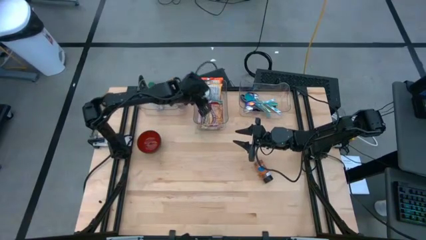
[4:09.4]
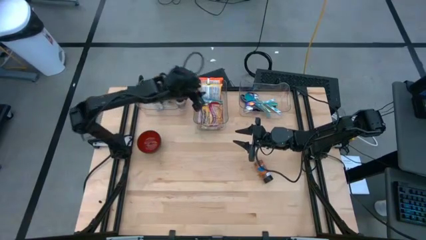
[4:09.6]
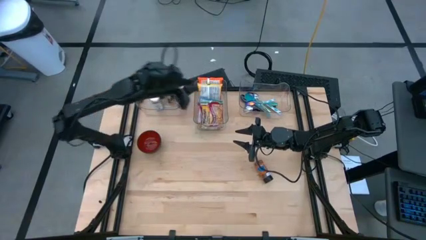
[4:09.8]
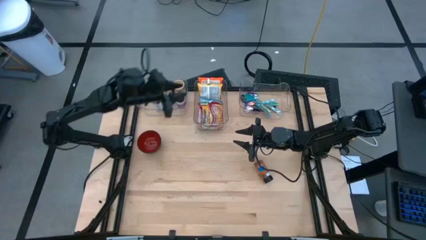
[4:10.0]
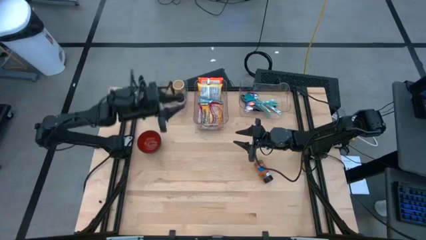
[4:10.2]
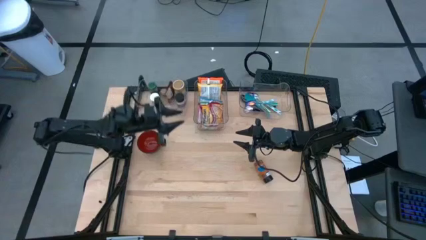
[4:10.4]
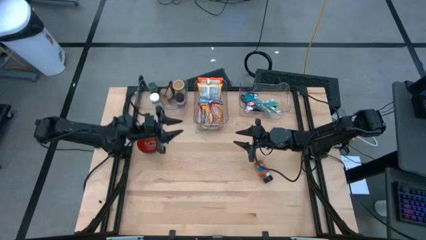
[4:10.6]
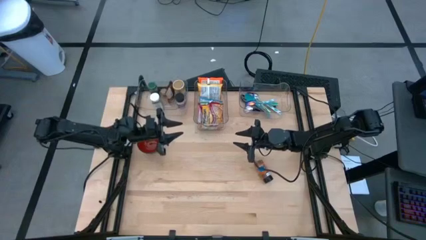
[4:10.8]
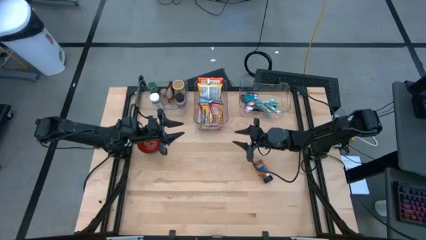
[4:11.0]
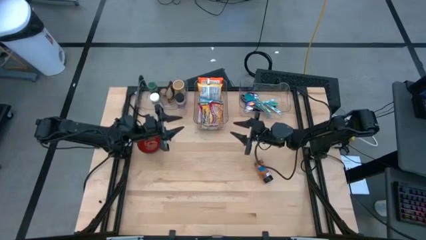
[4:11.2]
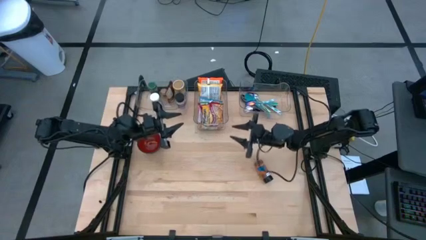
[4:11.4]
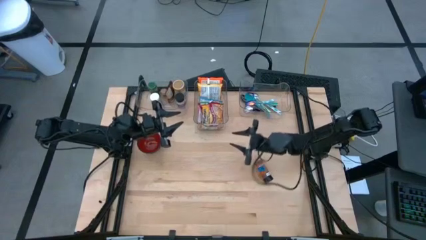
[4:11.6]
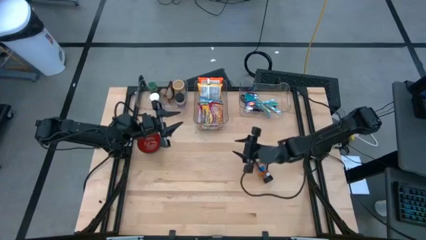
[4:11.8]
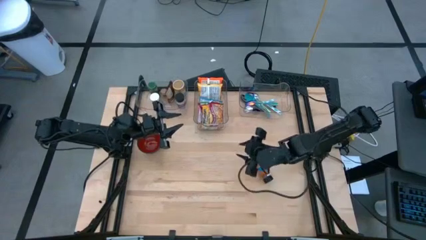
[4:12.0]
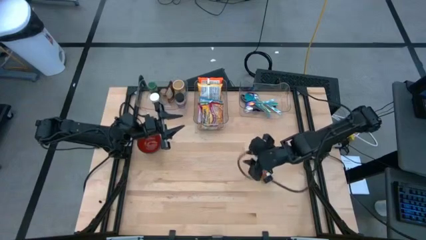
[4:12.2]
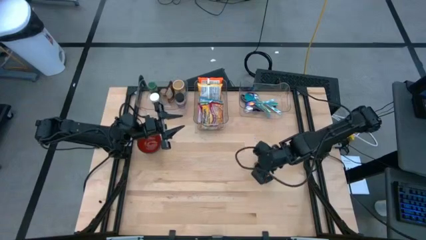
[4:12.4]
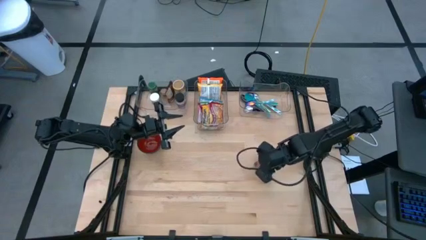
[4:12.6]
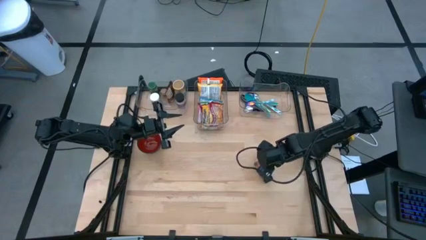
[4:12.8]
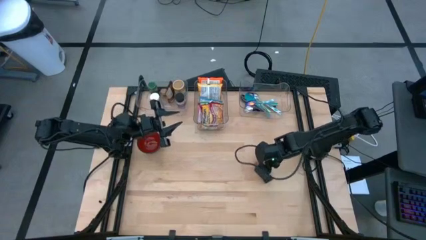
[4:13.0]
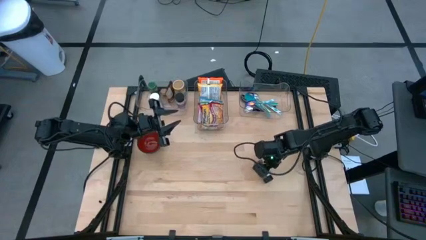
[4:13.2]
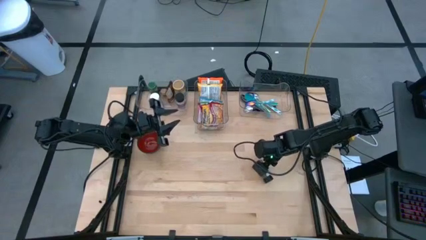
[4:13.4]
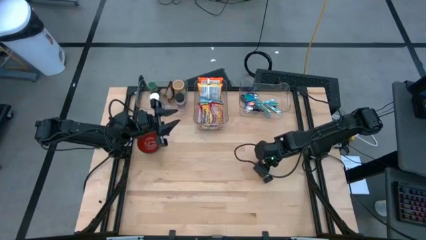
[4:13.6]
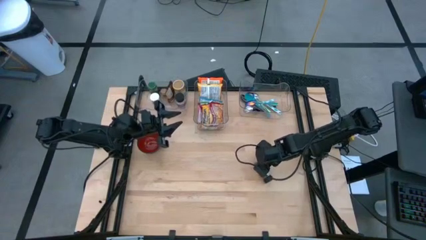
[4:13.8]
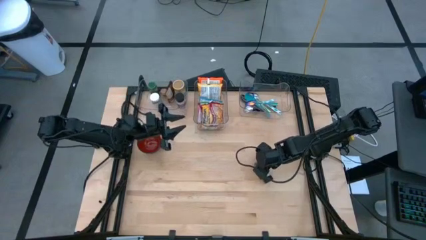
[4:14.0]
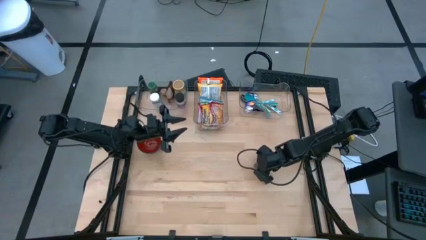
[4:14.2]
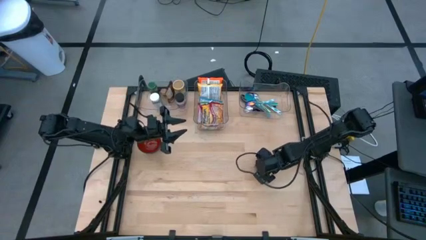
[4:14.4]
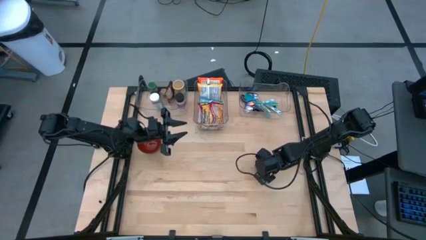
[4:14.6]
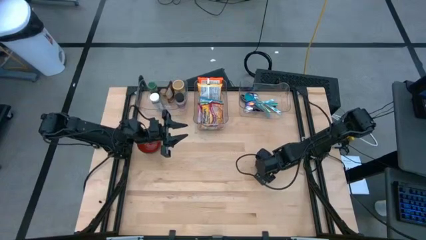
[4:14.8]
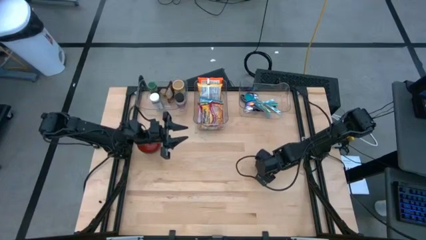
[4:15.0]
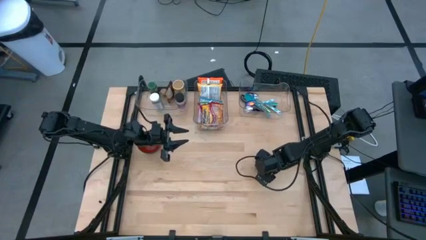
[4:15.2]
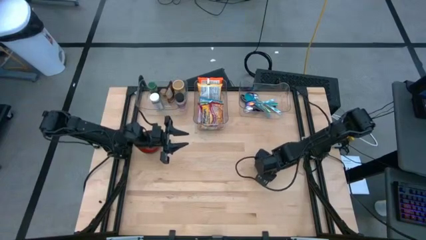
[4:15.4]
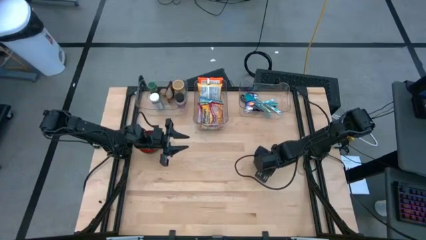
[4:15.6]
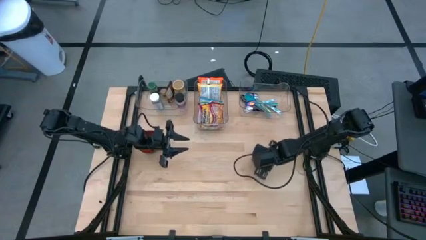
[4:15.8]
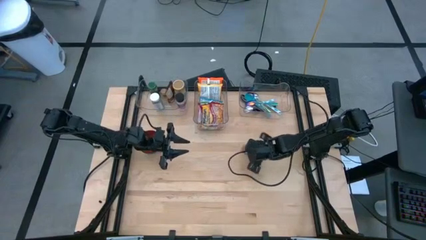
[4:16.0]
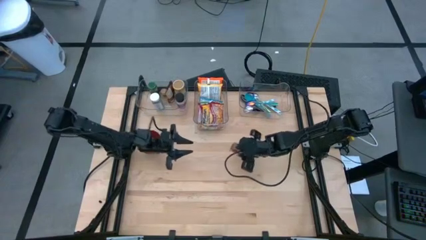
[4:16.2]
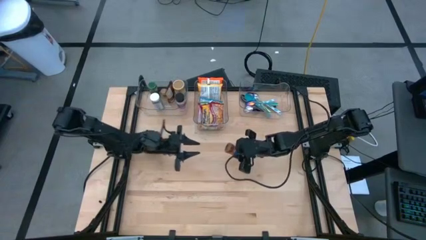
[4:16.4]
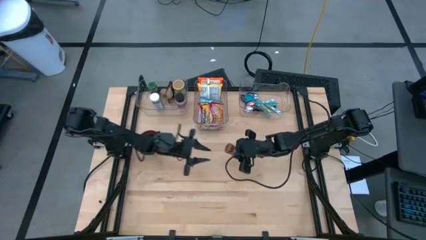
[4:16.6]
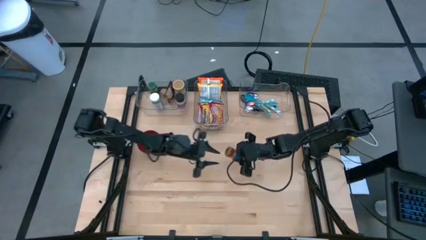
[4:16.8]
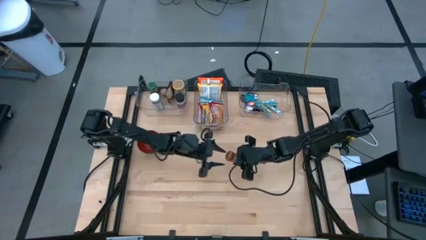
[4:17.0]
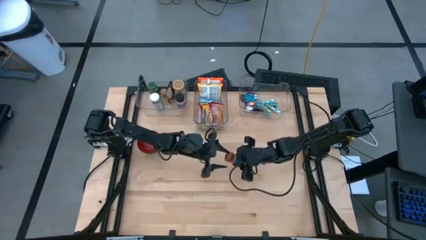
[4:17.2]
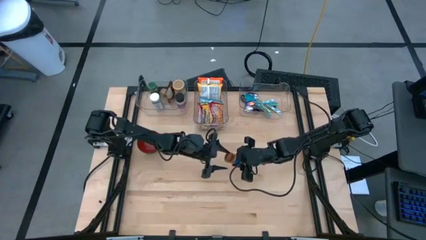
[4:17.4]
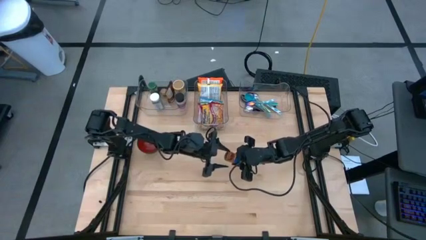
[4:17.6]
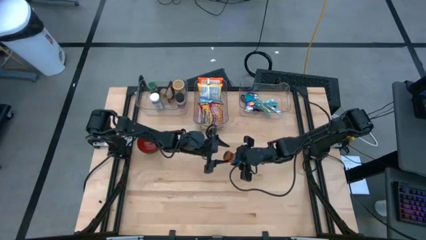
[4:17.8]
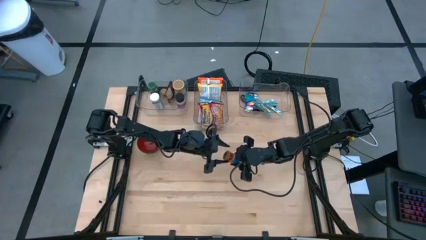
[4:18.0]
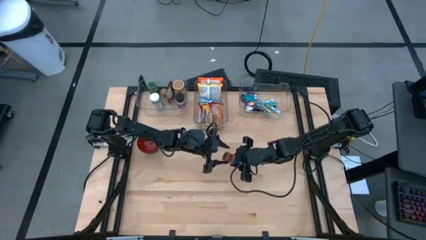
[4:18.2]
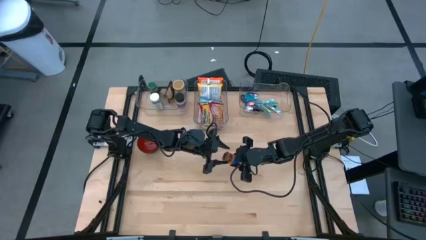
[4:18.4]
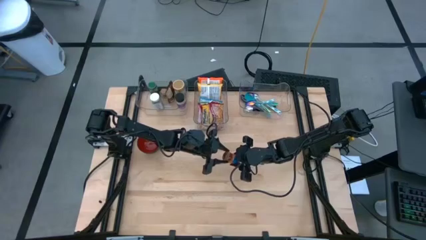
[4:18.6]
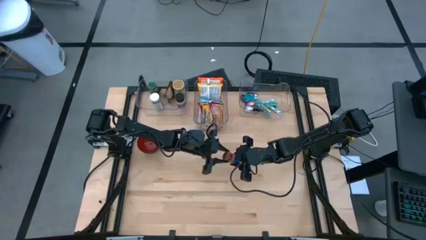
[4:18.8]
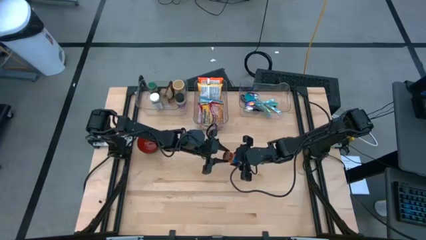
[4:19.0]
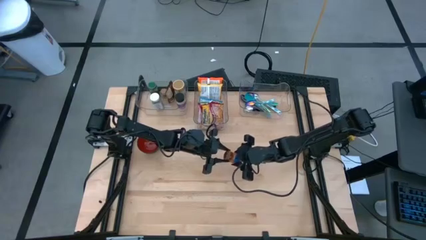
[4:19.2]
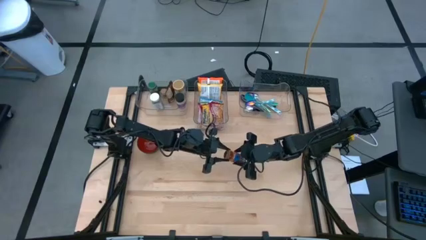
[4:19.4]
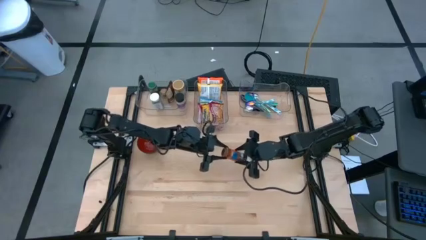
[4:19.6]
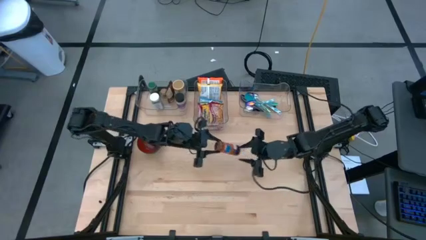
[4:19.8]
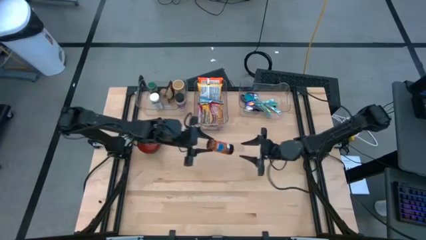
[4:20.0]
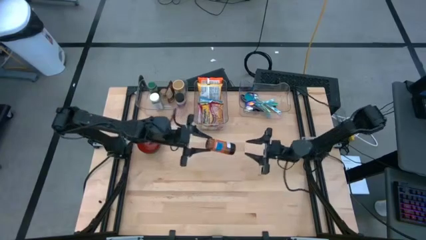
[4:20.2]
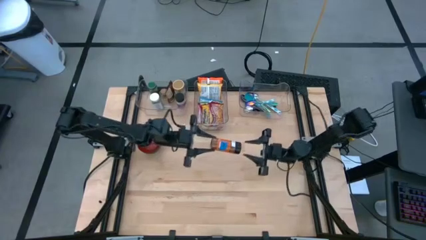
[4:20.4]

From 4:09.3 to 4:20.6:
Task: Pick & Place Food Item
Put the orange seasoning bottle into the left transparent bin

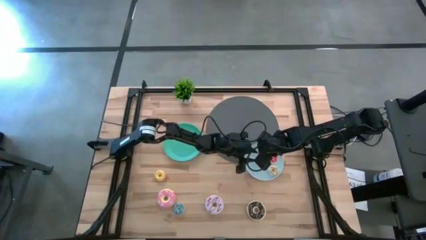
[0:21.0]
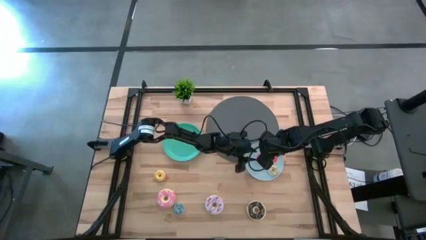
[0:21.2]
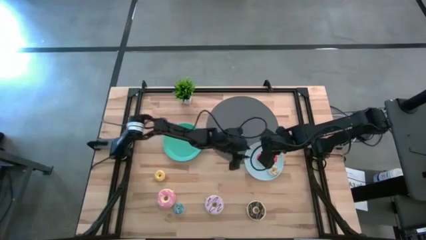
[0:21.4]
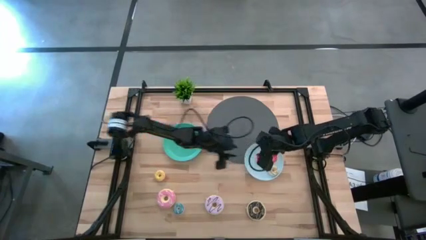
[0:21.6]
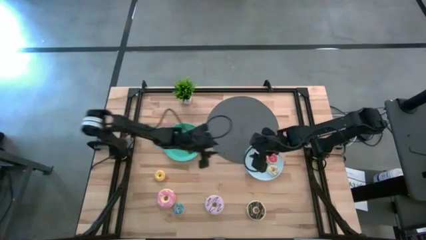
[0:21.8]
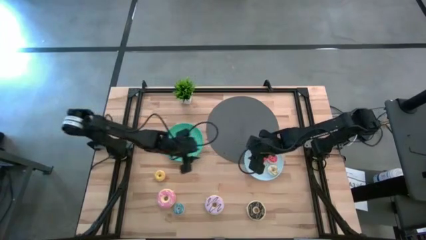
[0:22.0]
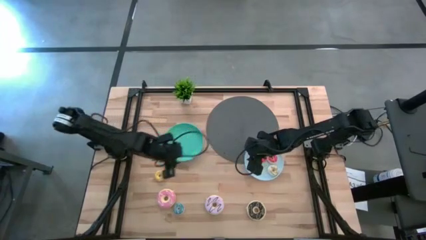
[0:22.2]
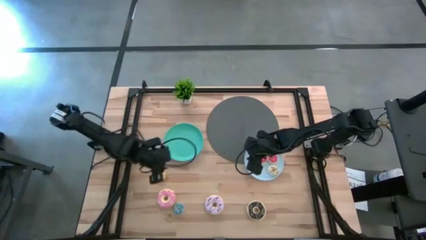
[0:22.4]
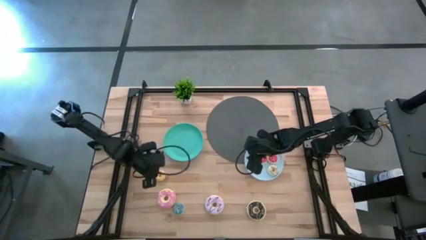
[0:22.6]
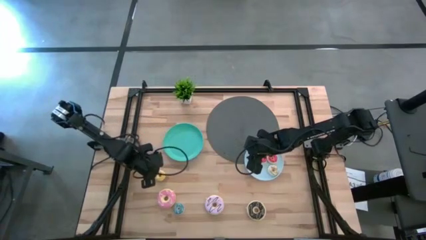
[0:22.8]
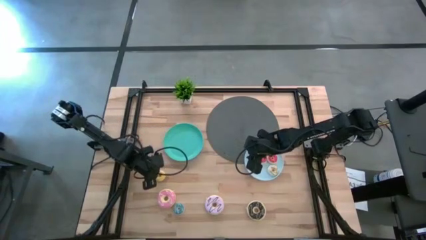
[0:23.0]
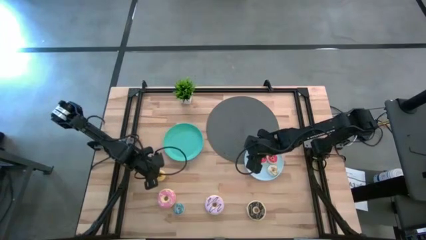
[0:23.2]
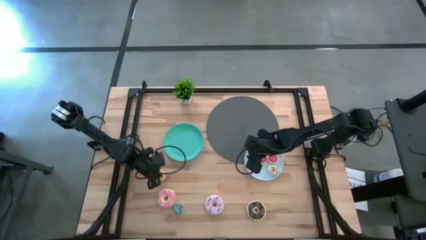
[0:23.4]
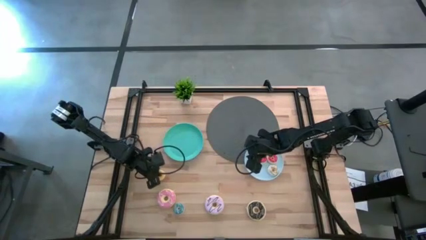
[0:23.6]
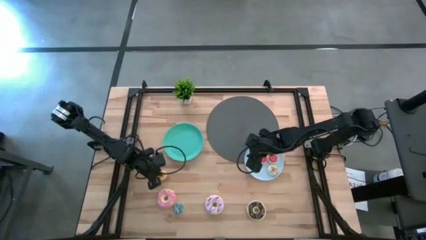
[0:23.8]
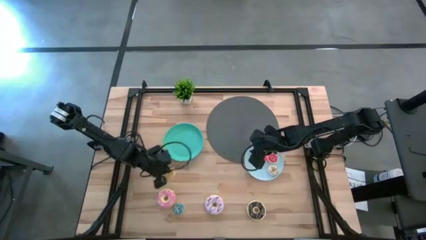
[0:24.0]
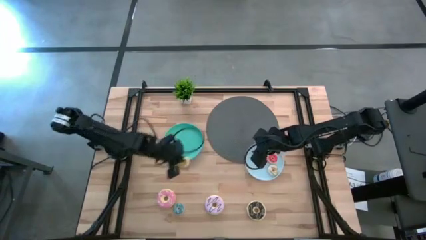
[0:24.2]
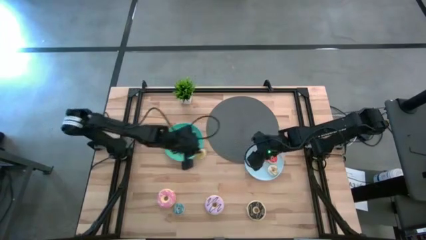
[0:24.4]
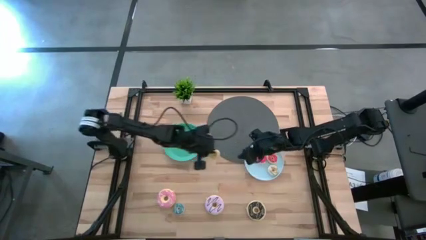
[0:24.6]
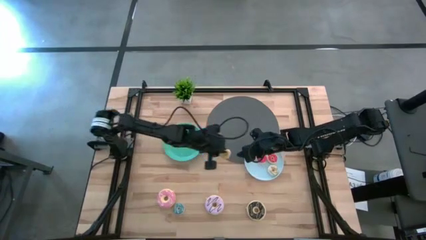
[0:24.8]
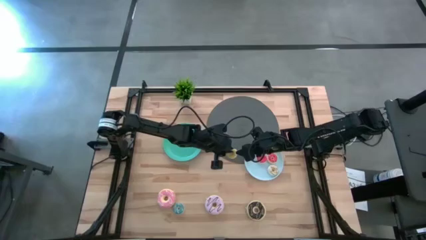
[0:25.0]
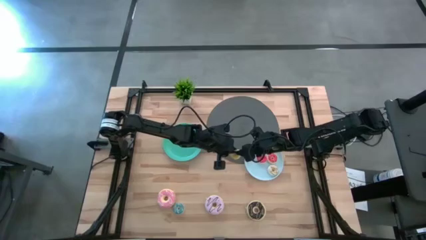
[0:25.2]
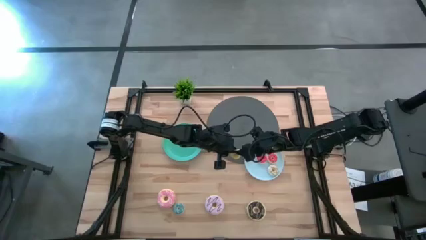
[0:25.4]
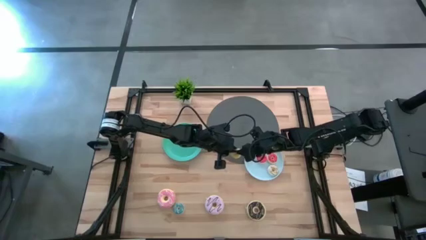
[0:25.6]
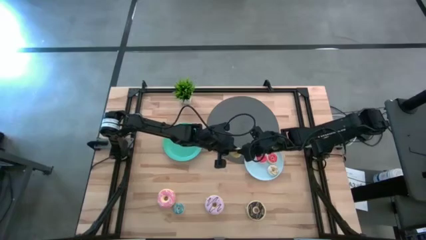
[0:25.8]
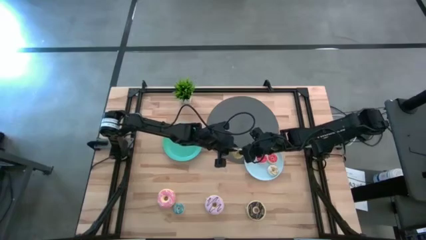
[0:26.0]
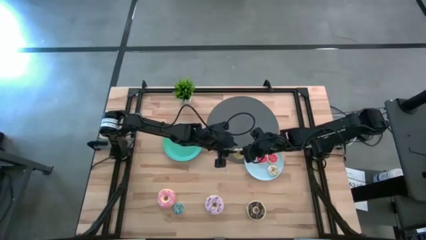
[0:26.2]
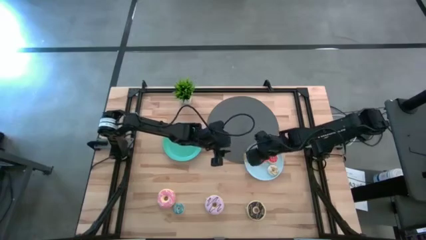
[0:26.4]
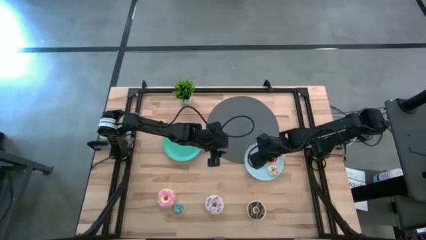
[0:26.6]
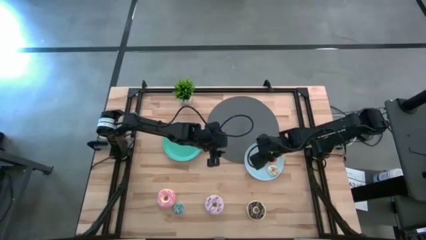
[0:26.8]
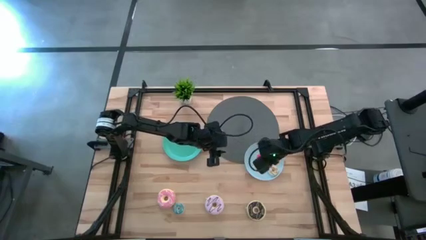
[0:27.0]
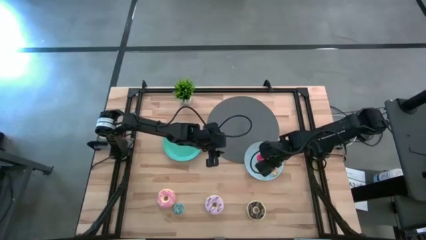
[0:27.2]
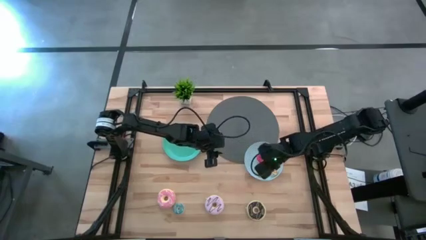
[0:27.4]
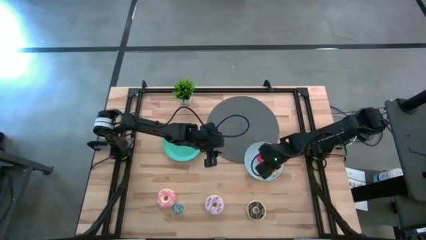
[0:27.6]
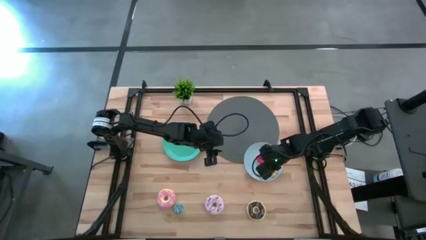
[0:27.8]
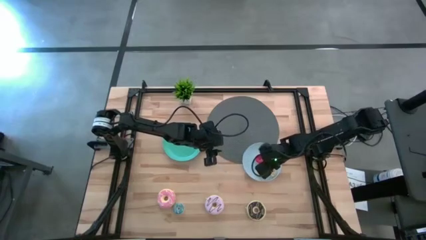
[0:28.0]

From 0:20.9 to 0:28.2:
Task: Pick & Place donuts
Put the small yellow donut on the blue plate
